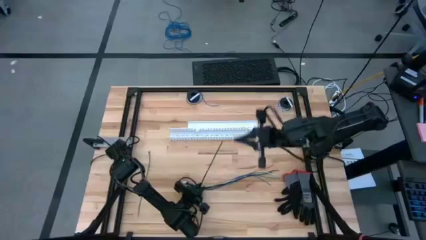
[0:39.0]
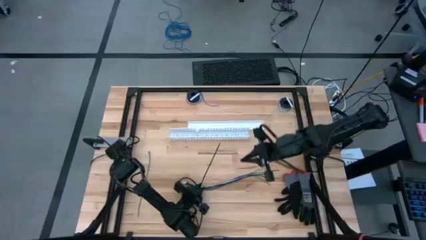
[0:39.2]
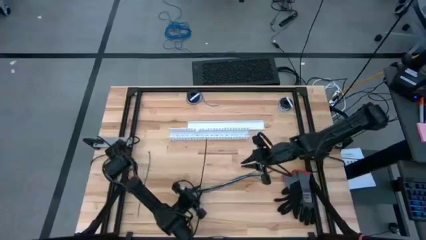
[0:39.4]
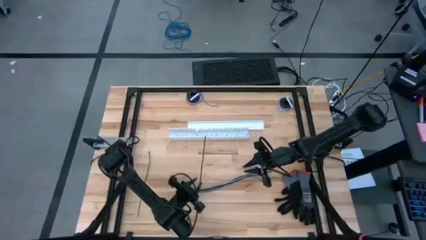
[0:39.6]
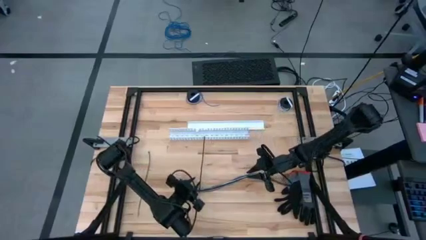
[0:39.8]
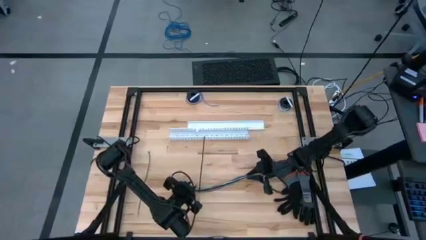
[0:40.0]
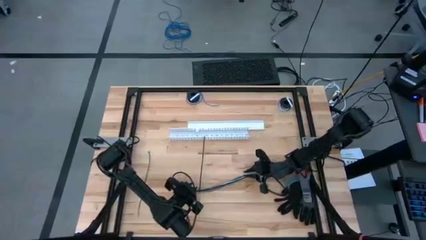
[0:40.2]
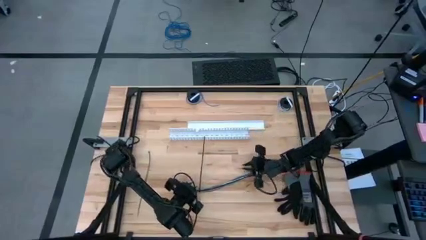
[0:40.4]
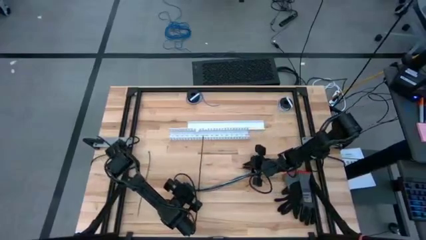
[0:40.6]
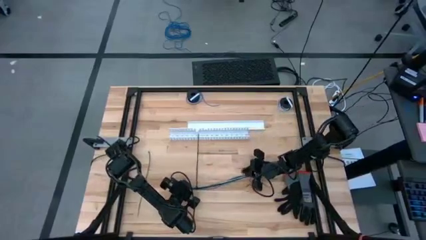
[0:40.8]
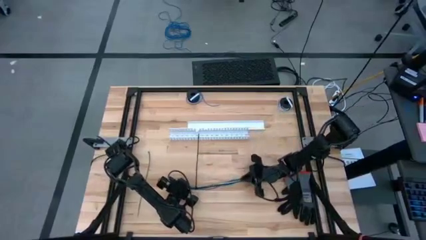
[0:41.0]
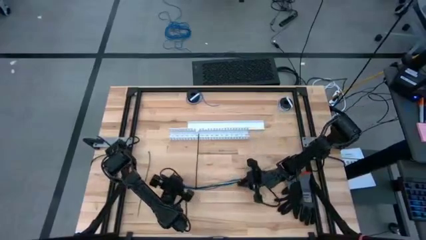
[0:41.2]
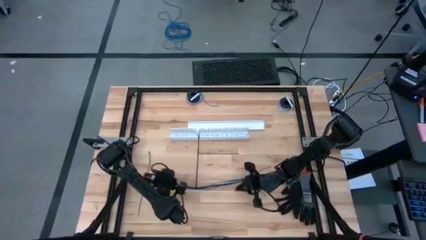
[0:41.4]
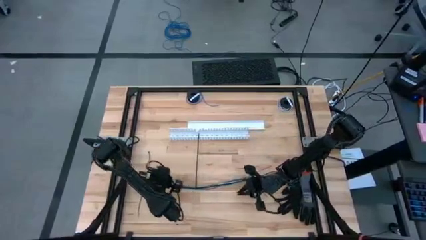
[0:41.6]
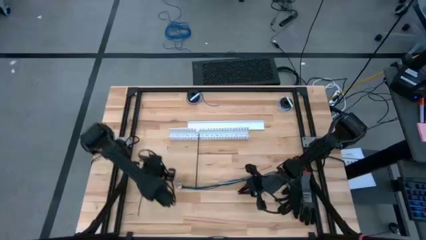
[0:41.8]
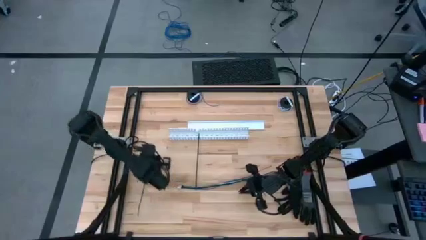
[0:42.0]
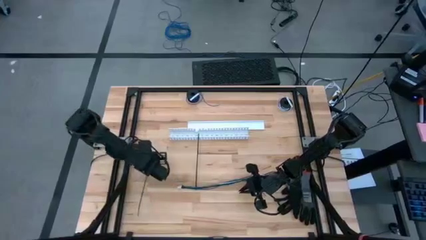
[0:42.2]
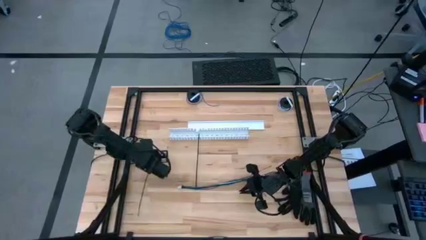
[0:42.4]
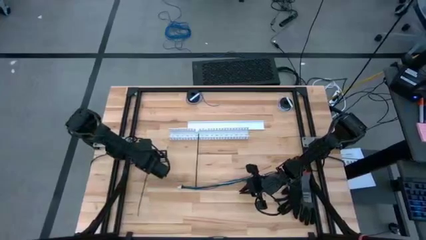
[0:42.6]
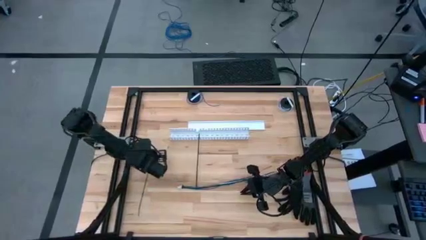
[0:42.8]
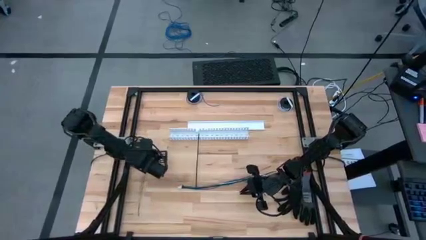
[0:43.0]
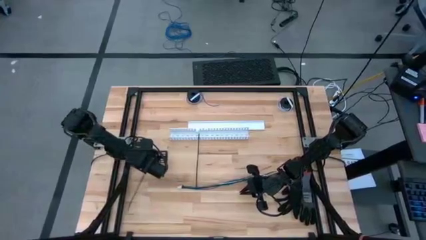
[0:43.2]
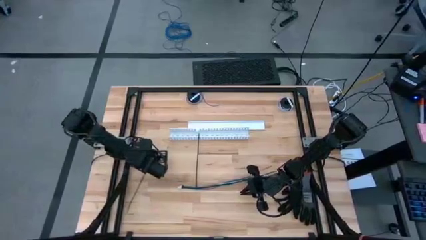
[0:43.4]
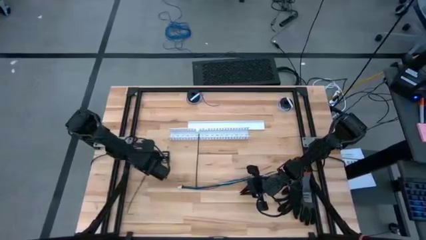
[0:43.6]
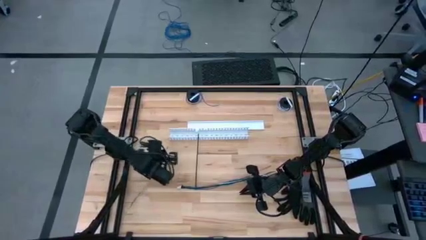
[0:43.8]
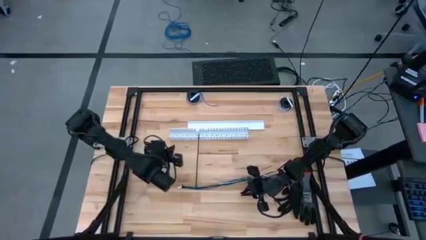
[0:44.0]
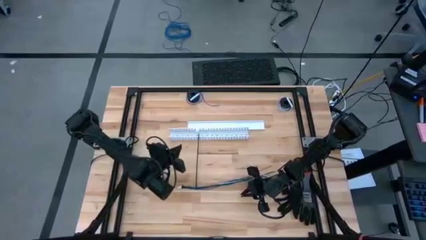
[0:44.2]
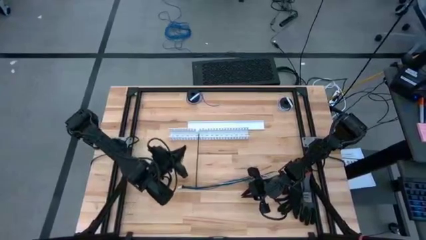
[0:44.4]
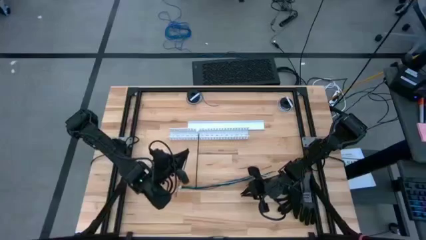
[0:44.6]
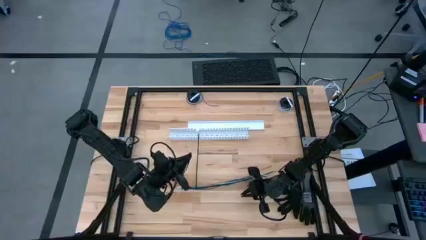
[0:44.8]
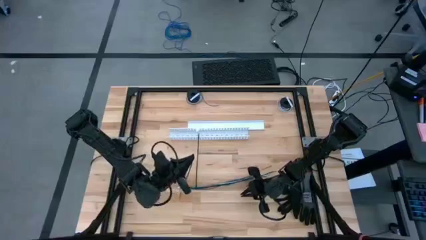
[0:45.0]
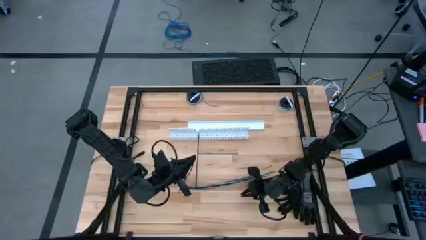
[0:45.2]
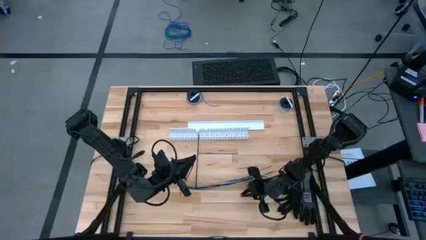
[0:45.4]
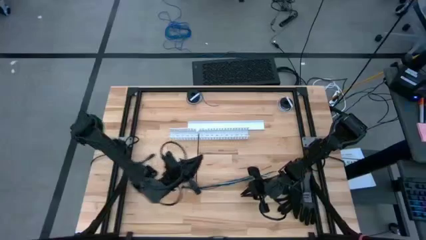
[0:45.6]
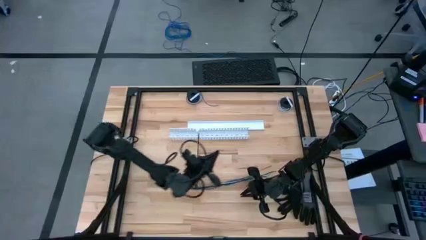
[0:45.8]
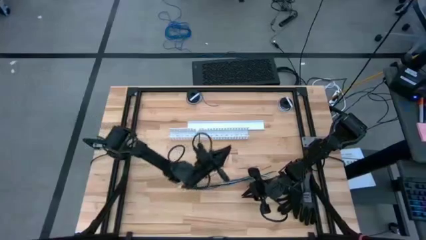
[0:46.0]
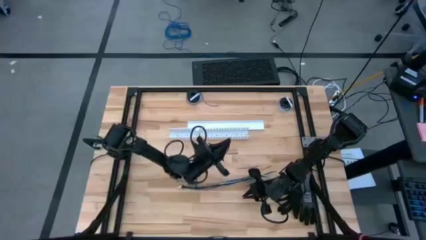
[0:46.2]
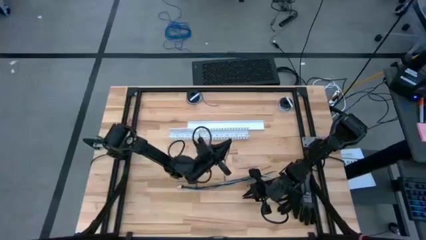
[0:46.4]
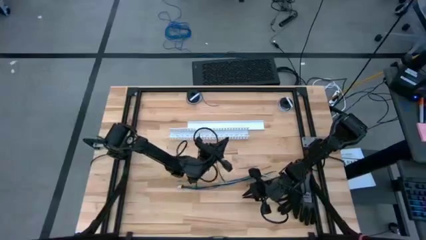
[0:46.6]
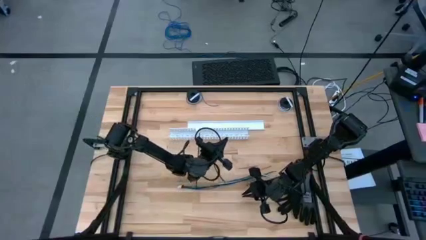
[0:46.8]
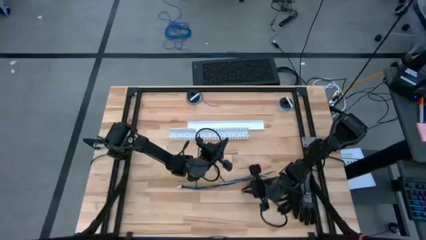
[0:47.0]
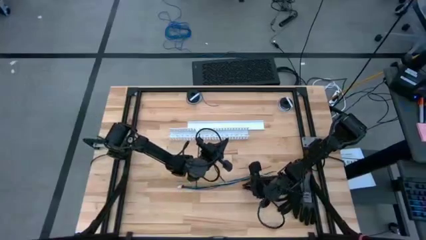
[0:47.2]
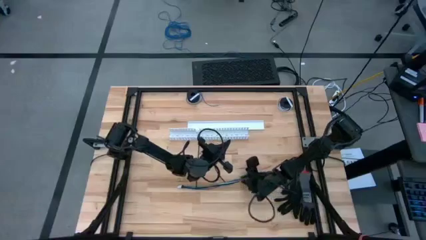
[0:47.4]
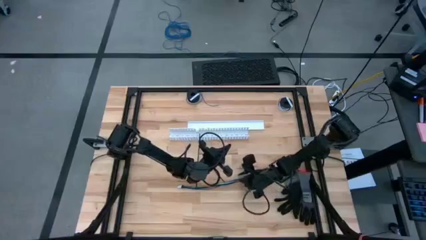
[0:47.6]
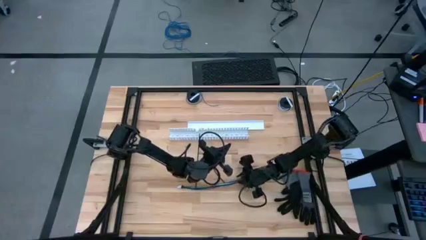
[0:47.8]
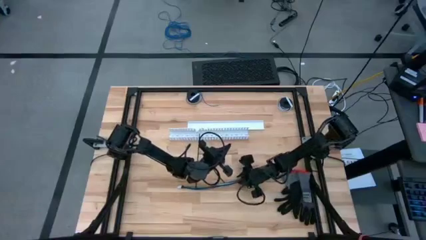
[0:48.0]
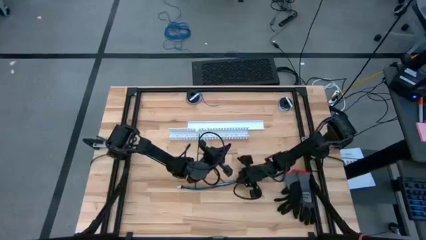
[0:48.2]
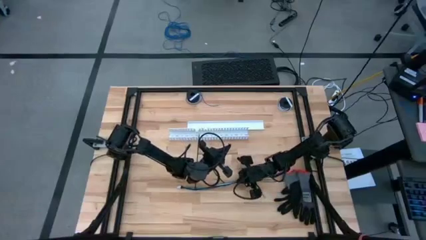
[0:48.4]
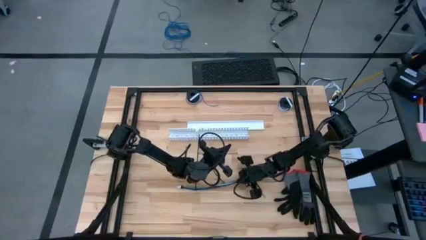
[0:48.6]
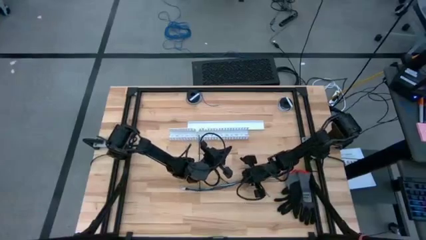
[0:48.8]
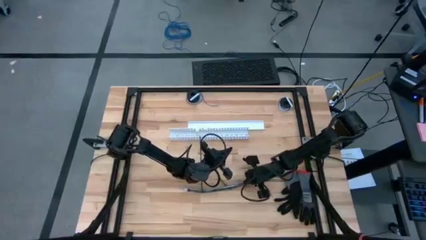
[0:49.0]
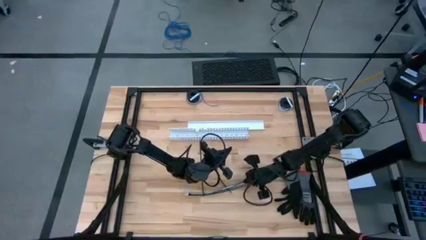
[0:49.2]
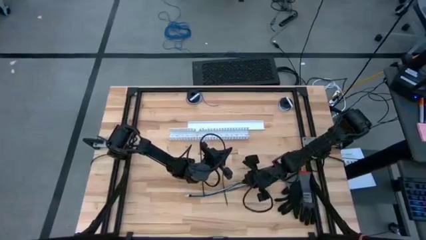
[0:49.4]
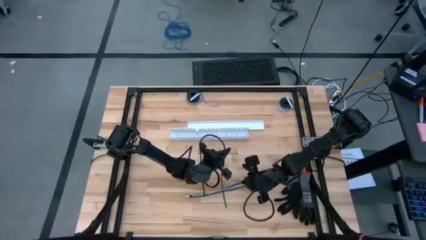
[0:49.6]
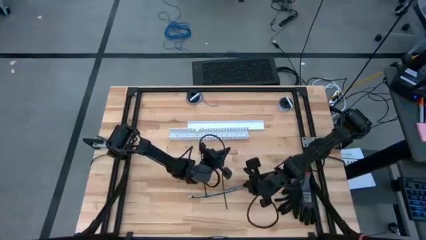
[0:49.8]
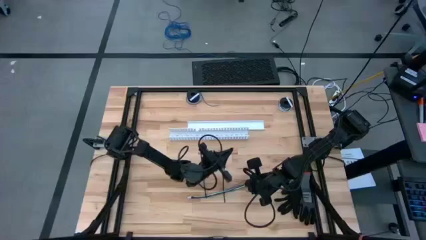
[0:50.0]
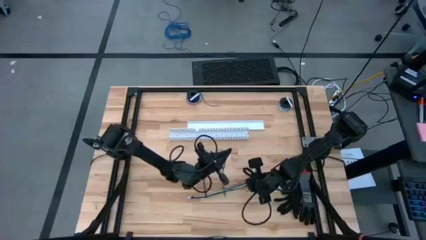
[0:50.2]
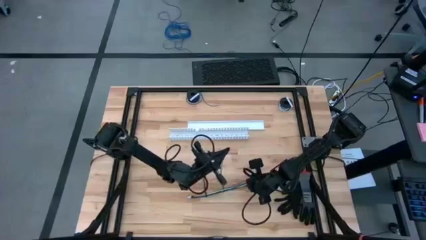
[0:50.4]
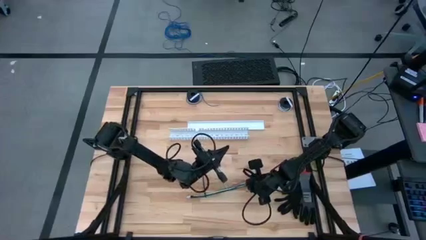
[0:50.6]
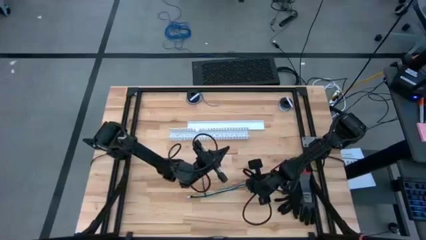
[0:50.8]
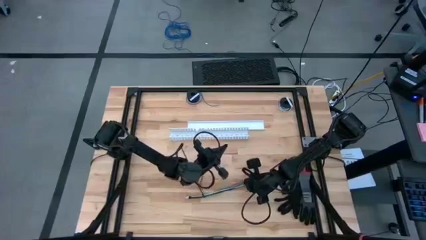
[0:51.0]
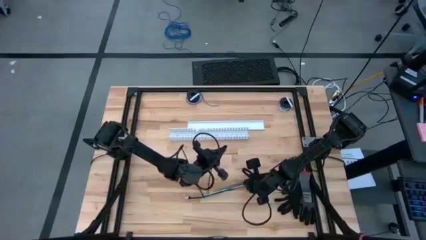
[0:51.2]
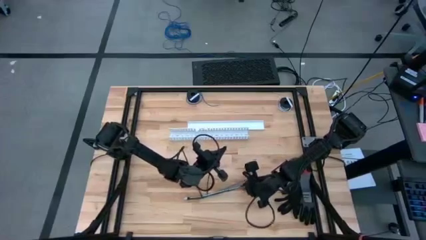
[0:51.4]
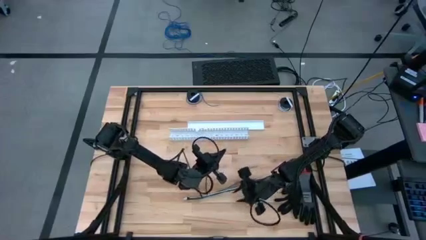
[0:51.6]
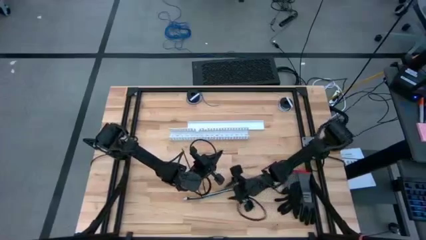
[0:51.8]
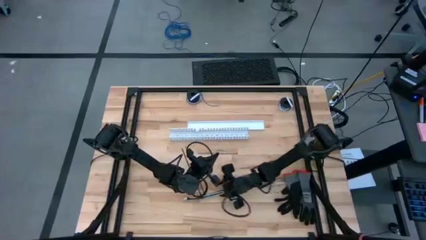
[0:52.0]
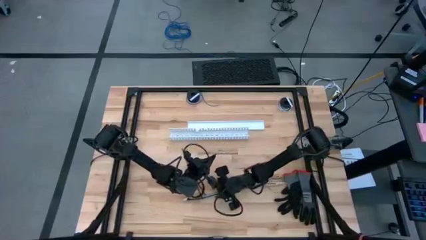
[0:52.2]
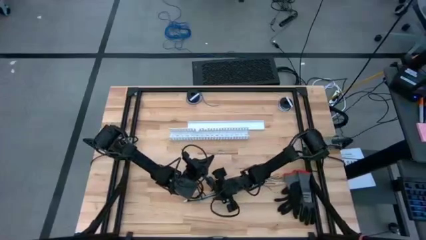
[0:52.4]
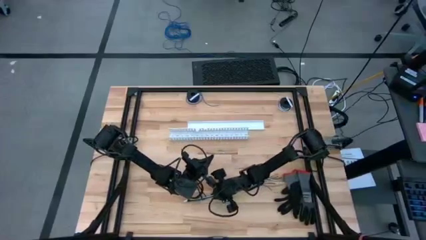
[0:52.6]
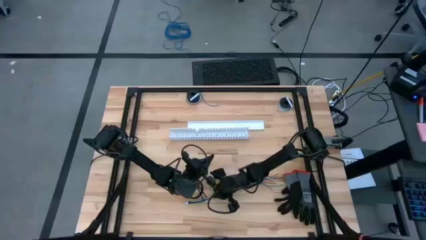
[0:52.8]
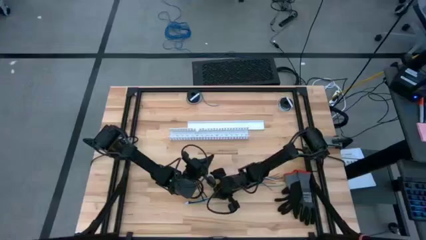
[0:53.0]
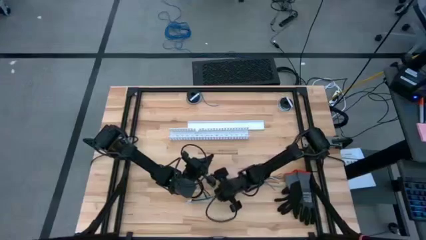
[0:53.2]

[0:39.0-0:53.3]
Task: Ziptie cables
Assemble the cable wires with the second cable zip tie

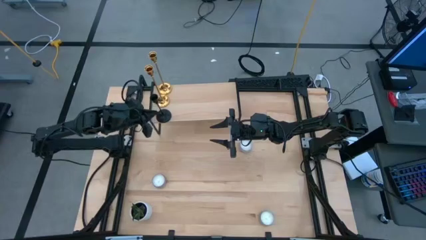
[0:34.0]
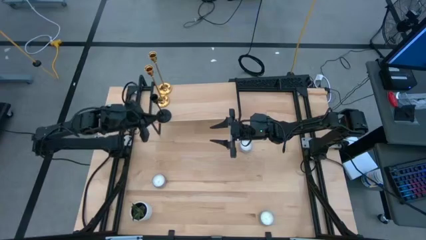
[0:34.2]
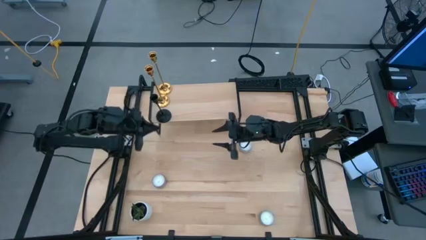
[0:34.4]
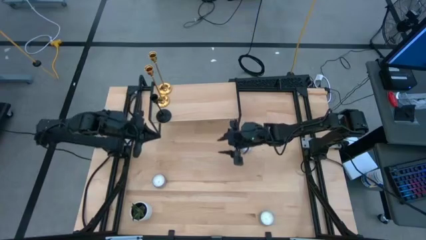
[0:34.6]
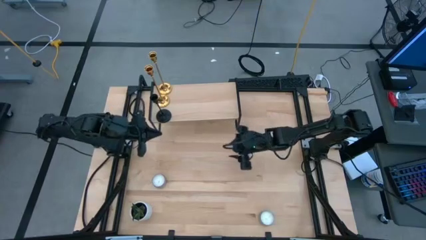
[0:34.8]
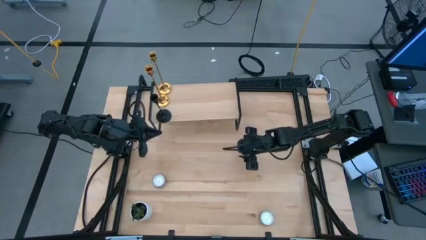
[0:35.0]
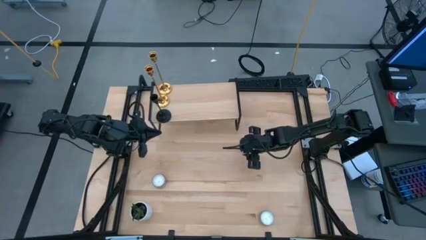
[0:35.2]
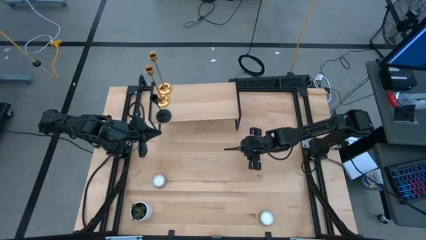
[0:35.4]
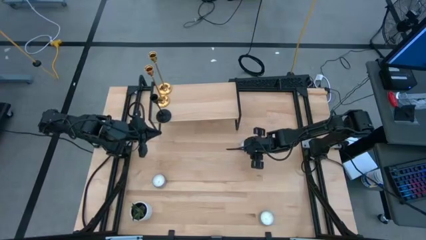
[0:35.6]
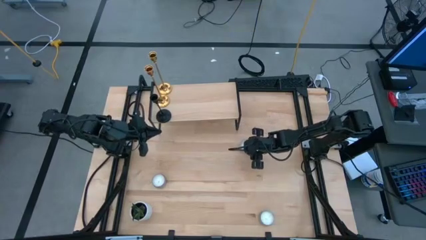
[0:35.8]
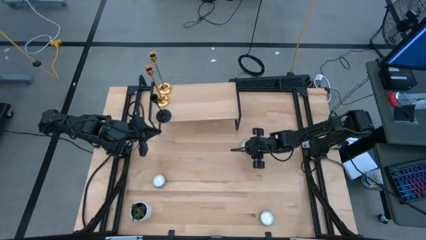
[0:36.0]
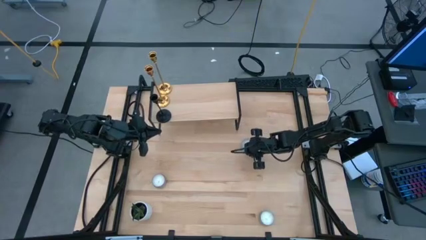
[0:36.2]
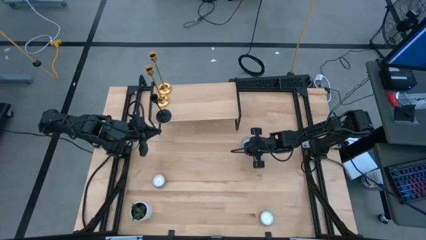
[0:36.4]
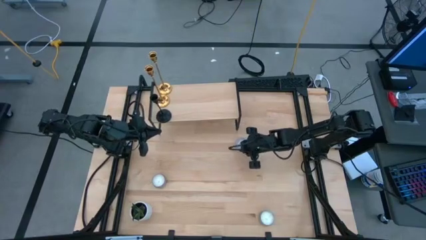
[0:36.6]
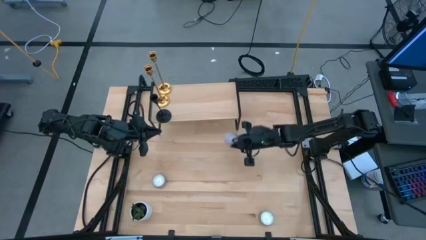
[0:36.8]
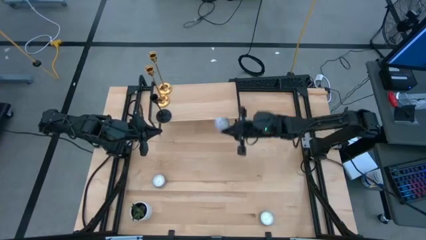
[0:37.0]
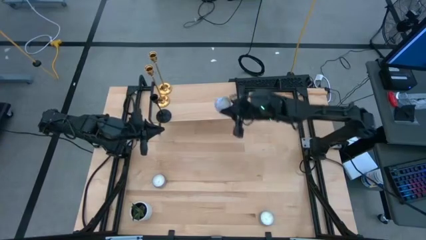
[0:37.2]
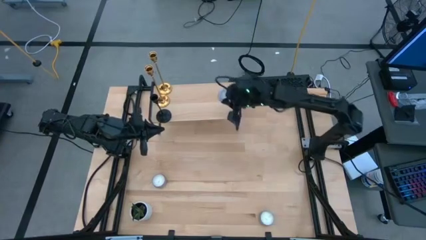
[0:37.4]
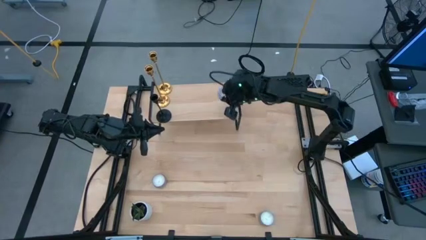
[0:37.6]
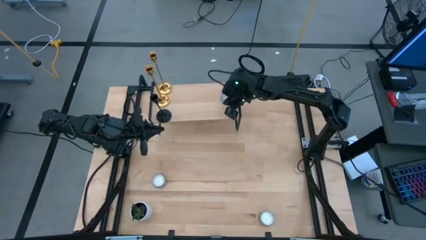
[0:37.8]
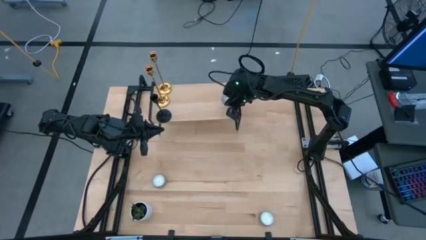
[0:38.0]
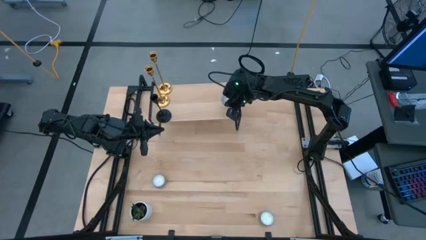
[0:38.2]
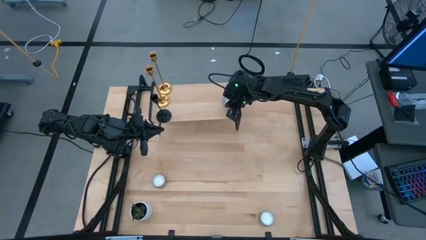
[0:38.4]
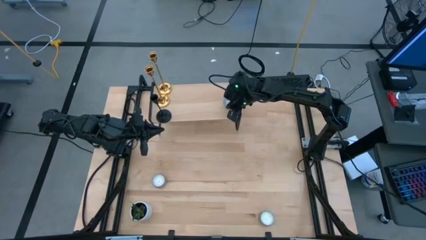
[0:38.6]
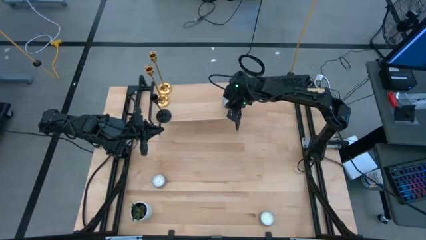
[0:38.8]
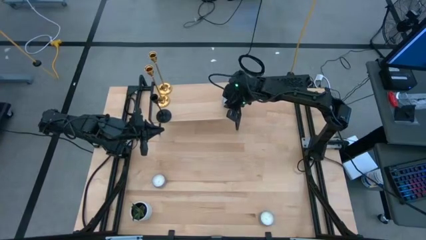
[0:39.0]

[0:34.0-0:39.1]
Task: Pick & Place candle stick holders
Put the red white candle bottle on the shelf
